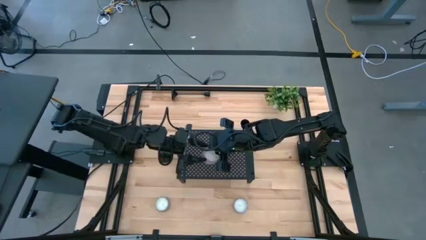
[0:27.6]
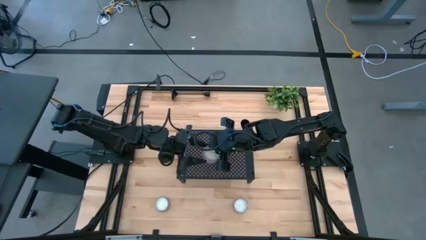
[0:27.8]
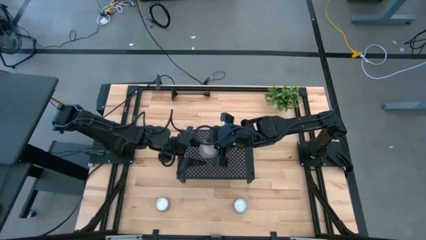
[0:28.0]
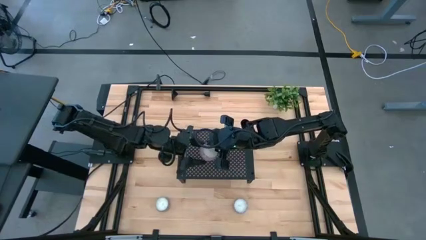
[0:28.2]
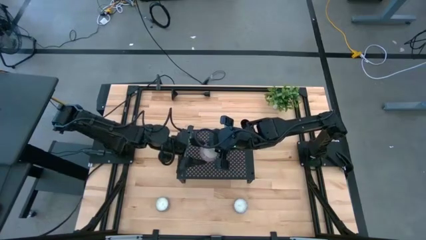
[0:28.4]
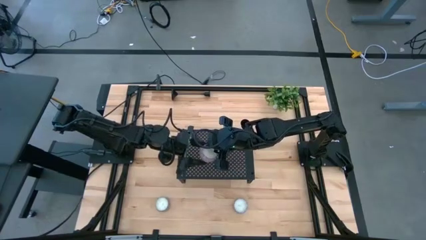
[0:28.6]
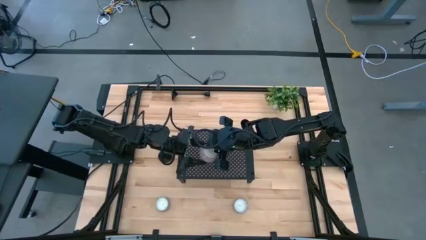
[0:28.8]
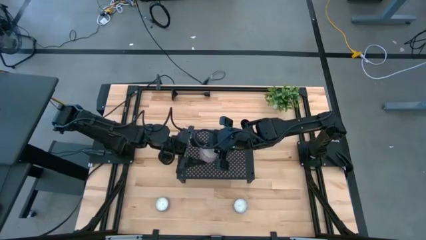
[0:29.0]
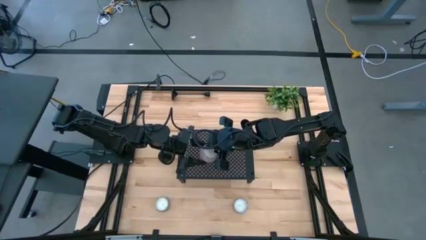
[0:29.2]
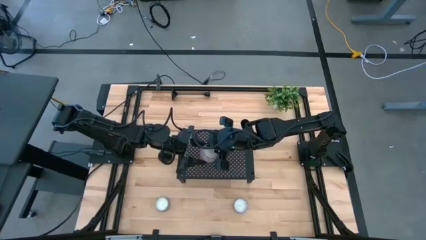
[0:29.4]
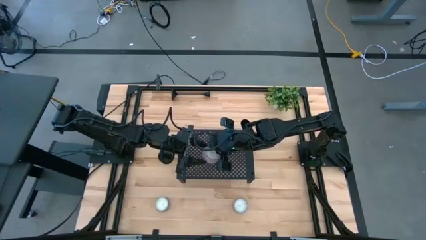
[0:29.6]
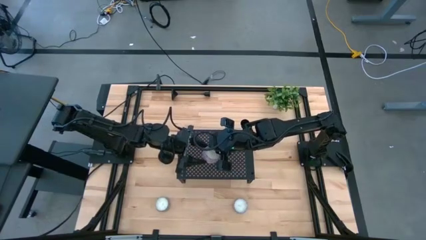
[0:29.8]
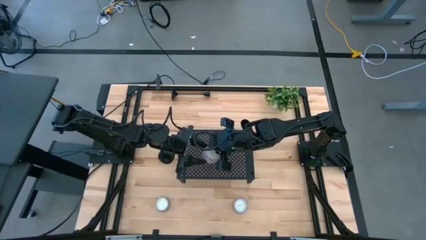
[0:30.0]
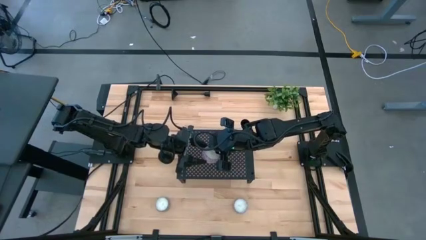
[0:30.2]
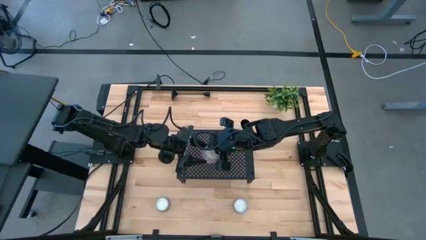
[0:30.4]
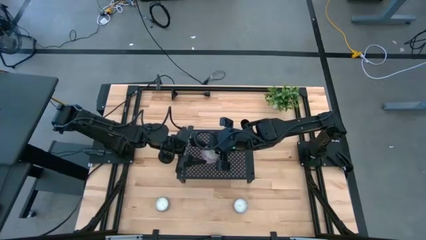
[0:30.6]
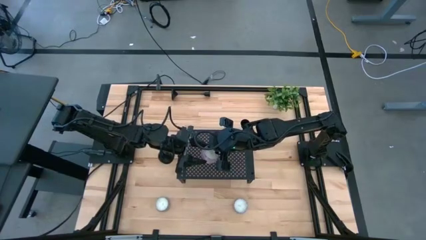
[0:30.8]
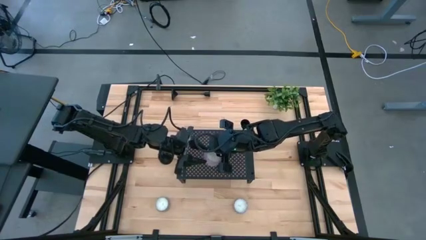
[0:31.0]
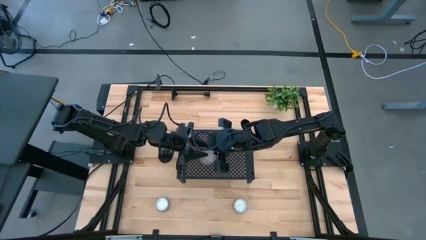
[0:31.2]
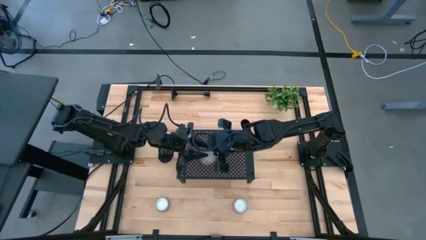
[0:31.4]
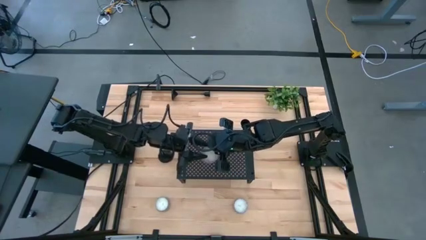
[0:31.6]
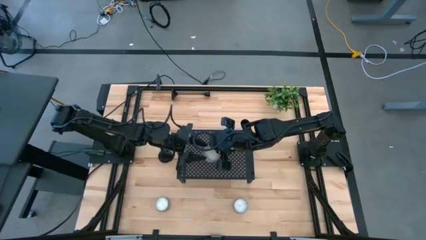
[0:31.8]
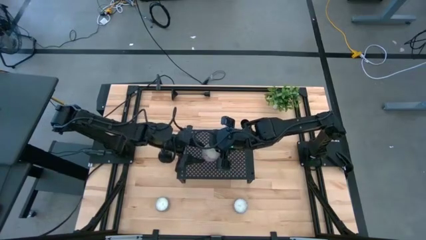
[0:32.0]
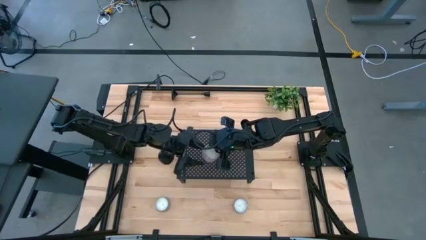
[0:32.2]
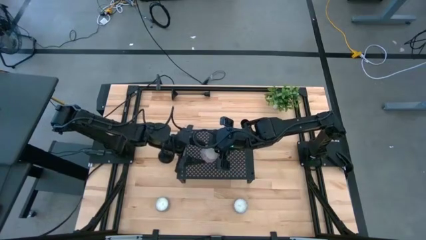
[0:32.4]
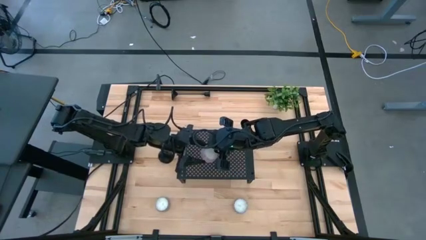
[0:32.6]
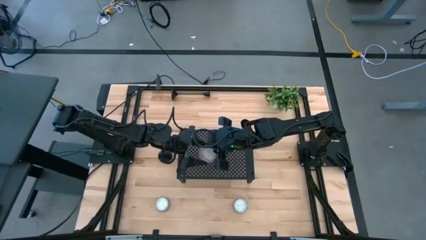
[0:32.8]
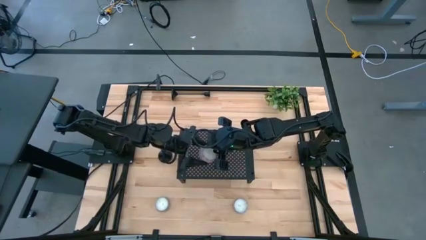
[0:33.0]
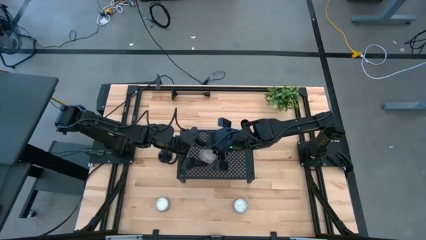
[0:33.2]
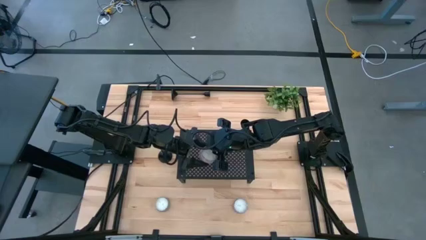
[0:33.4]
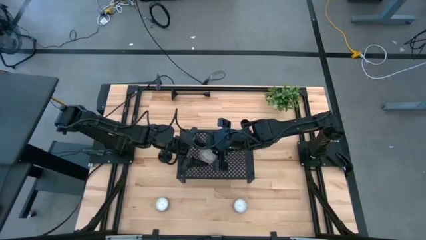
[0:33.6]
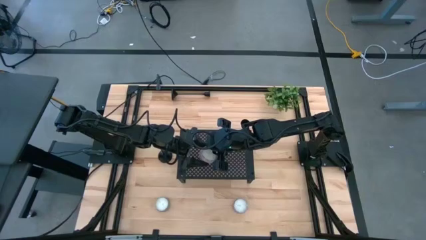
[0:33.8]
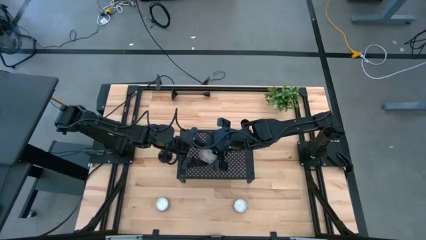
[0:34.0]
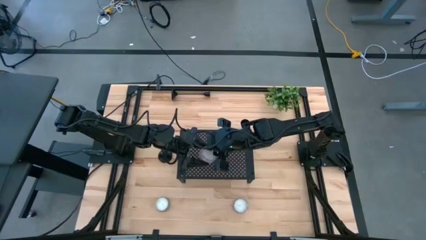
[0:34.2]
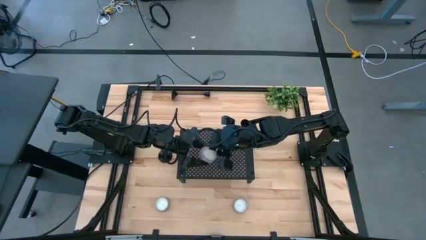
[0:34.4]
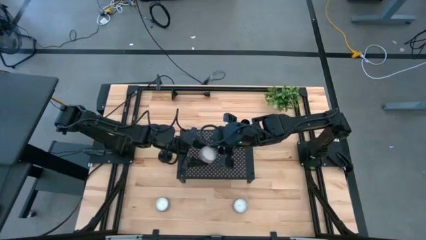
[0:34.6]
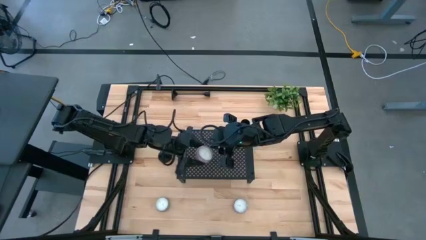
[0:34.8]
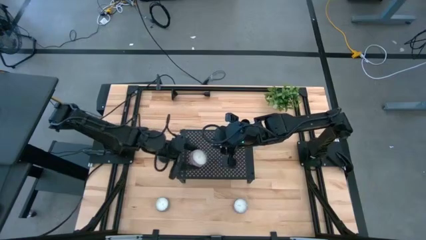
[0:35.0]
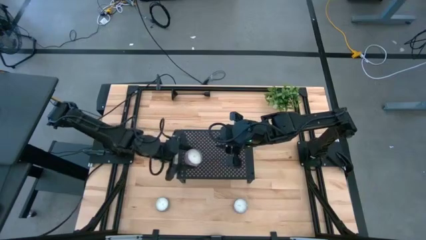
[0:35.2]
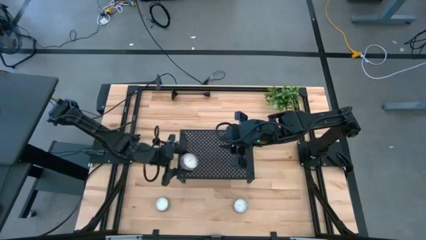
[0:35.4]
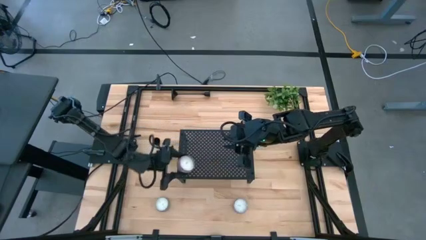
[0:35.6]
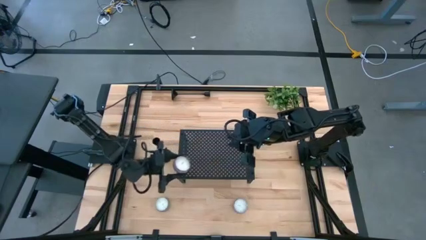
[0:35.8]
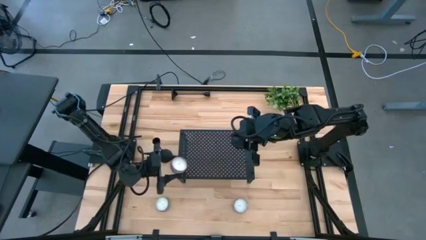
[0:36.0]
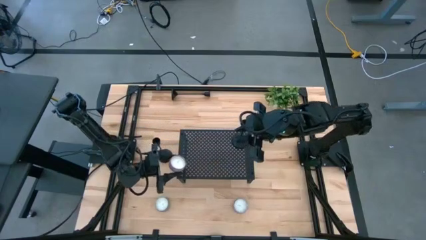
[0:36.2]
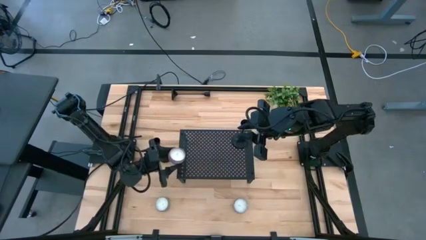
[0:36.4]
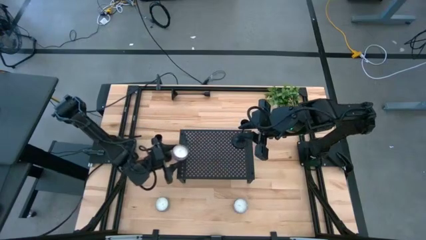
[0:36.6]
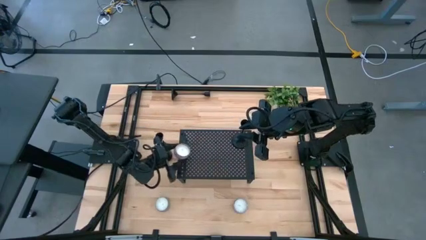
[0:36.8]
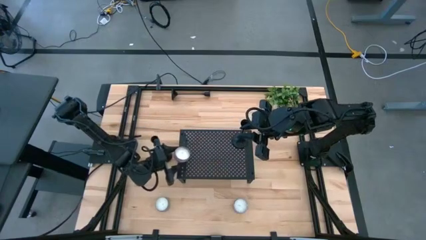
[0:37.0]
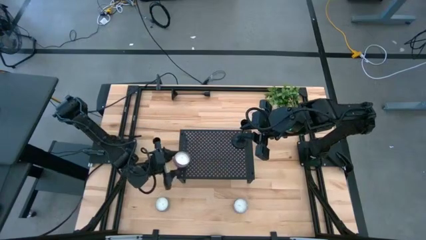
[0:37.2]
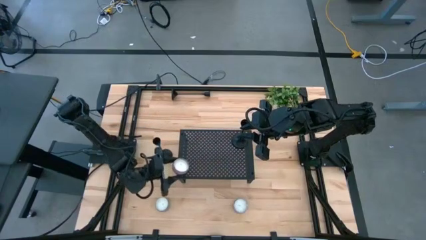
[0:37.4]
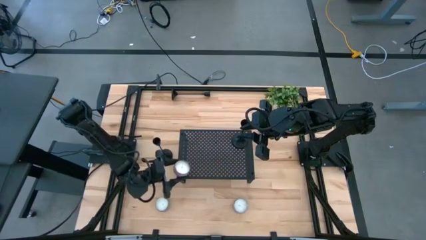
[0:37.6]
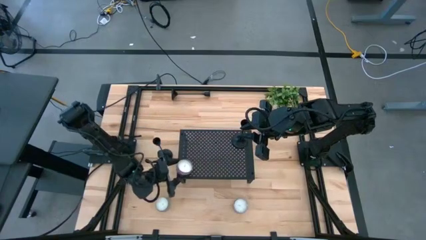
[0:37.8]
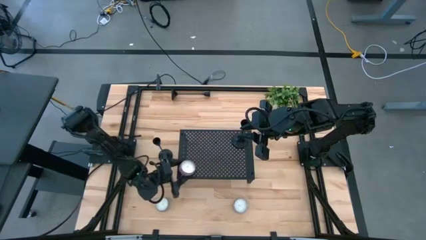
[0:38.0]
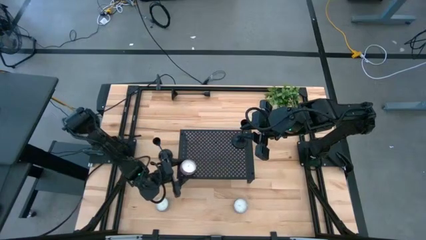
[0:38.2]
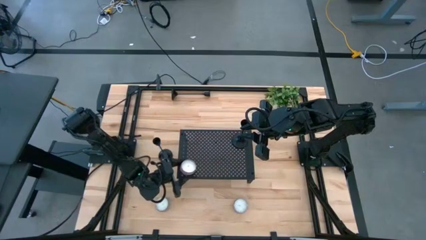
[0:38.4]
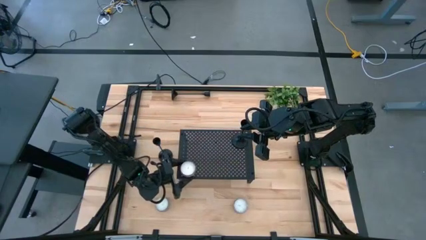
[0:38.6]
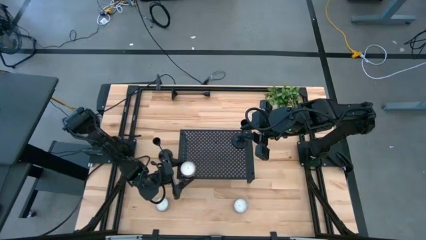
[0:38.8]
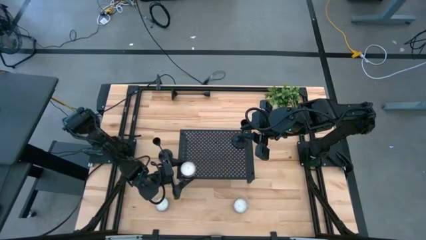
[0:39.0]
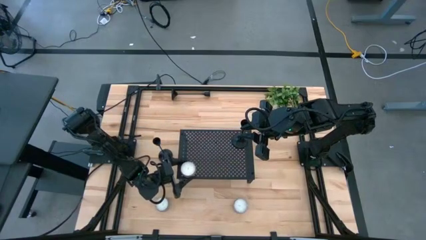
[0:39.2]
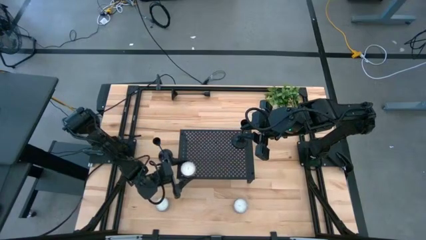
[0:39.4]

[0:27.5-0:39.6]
Task: Pick & Place candle stick holders
Put the pink patterned scented candle on the shelf

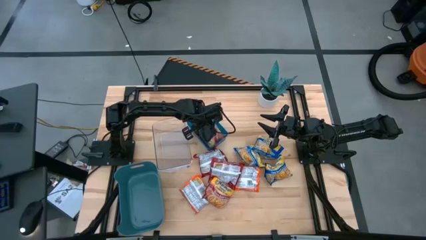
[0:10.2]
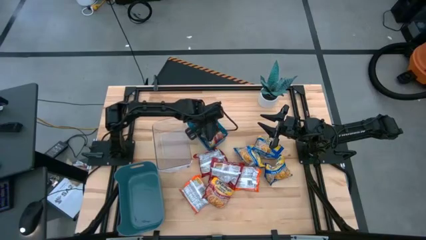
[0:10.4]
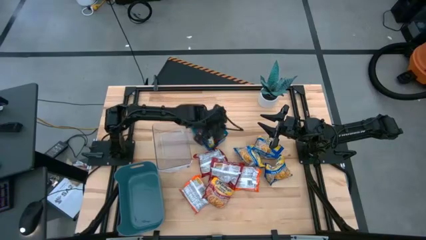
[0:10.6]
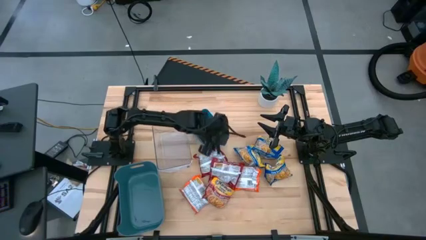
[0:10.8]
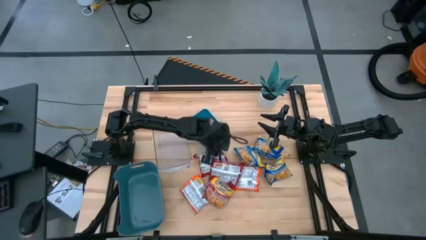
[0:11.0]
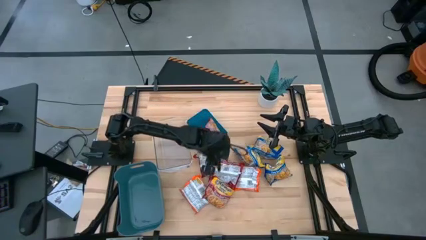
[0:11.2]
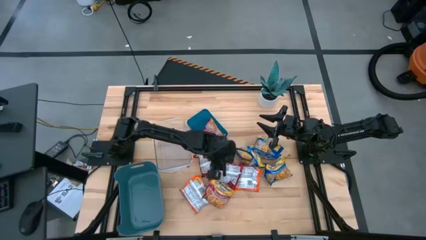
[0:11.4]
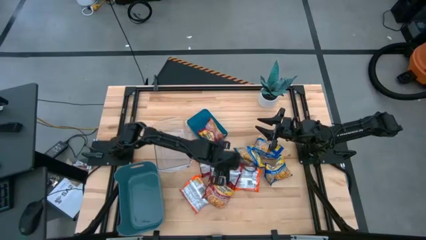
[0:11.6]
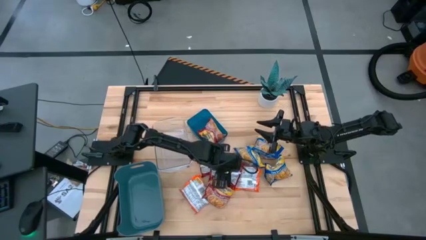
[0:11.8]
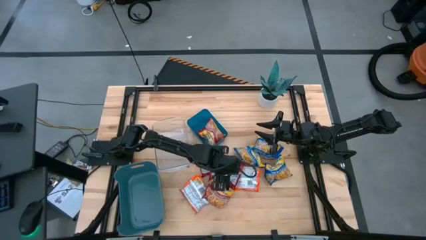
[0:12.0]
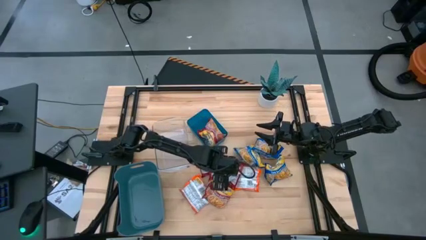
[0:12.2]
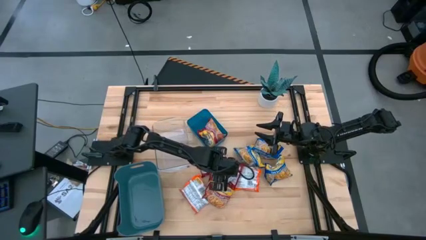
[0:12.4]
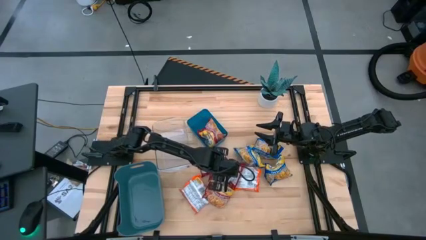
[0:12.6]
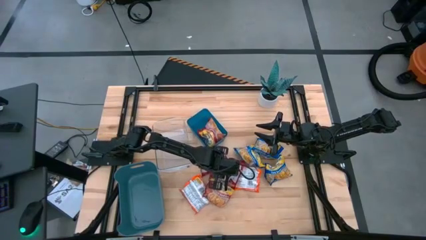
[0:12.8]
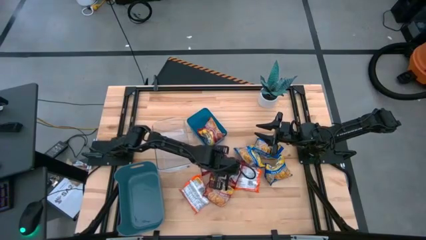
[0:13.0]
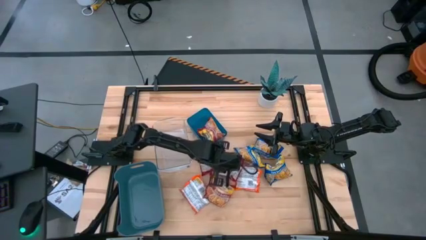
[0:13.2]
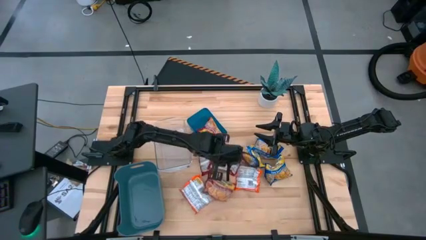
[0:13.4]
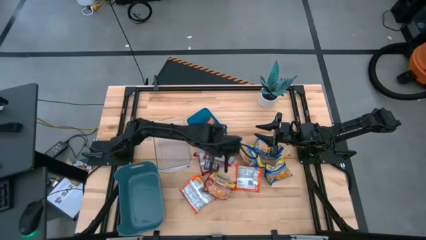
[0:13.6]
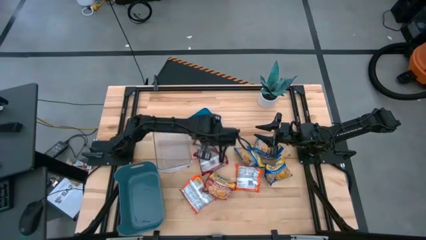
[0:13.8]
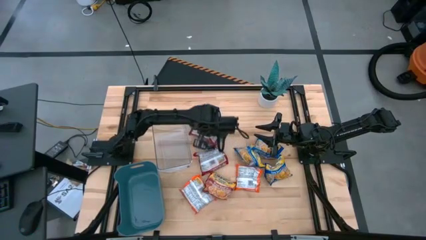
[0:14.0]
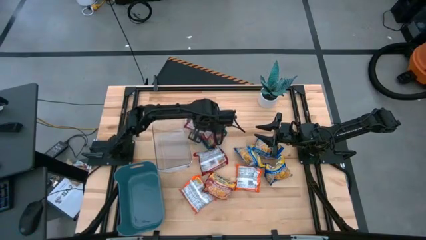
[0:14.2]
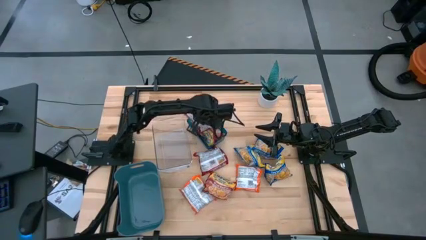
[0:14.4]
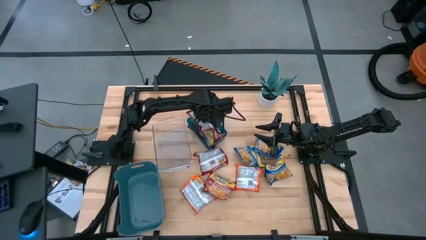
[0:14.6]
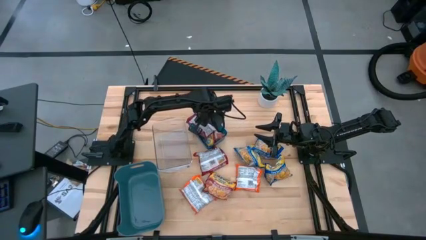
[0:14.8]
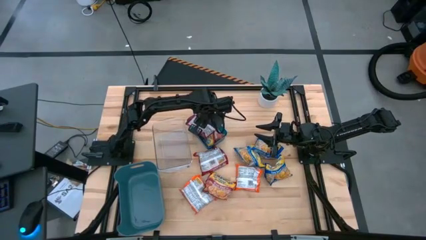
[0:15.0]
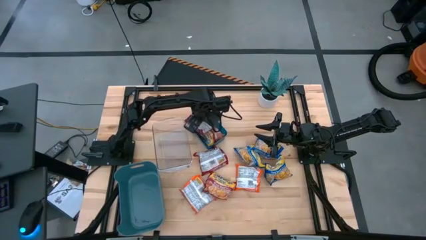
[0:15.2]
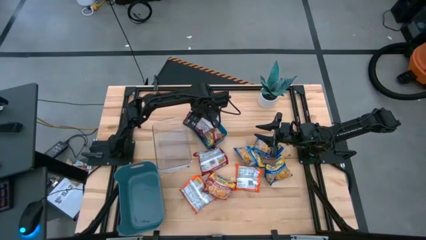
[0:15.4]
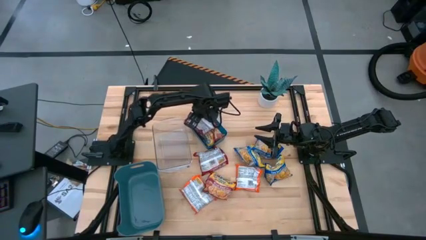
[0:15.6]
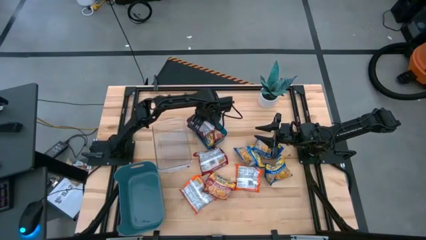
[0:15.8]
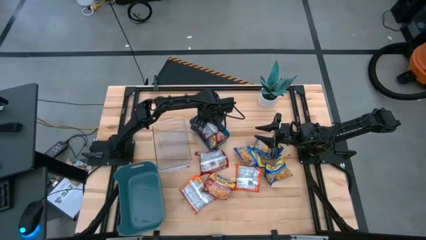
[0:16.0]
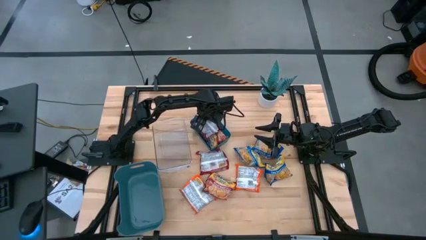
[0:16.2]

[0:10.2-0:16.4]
Task: Sort Maruchan noodles
Put the red noodle pack into the blue bin
